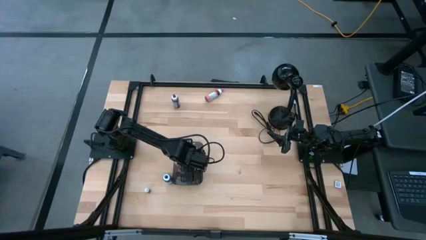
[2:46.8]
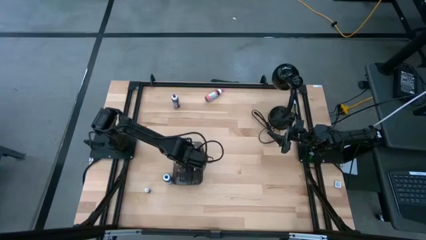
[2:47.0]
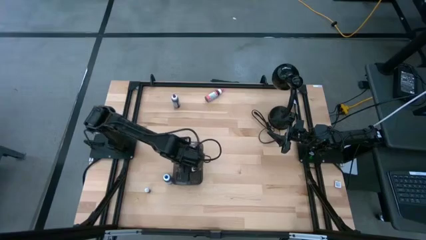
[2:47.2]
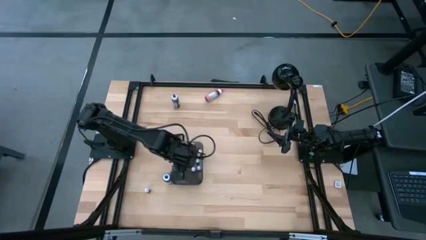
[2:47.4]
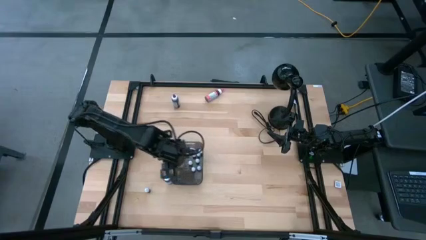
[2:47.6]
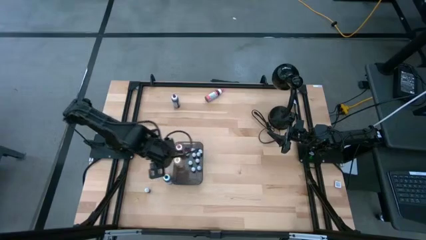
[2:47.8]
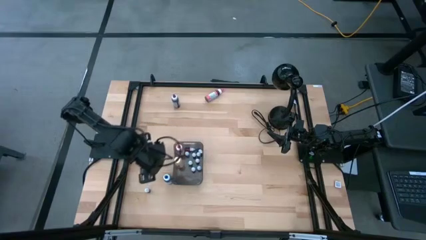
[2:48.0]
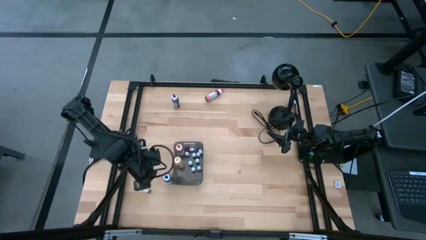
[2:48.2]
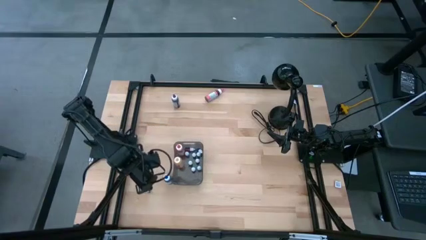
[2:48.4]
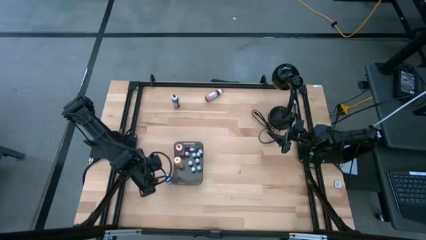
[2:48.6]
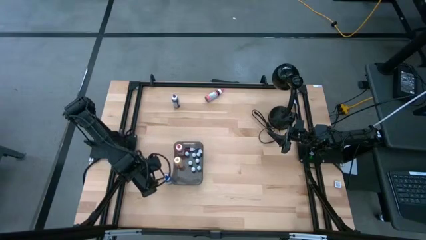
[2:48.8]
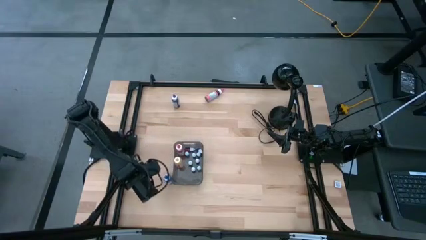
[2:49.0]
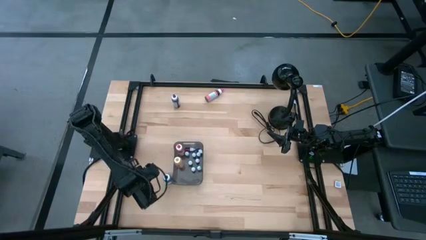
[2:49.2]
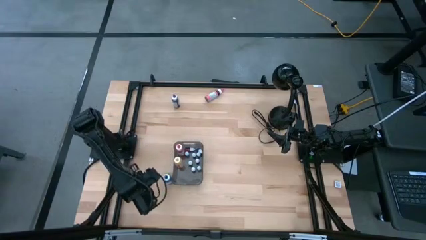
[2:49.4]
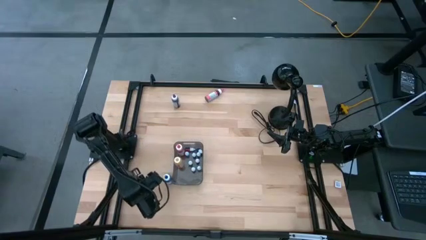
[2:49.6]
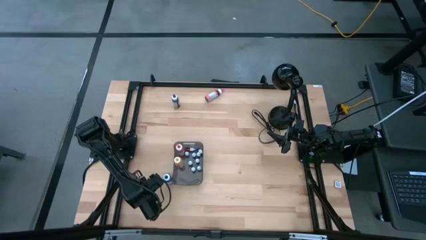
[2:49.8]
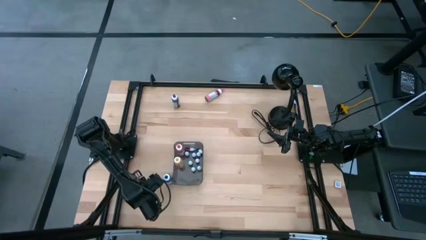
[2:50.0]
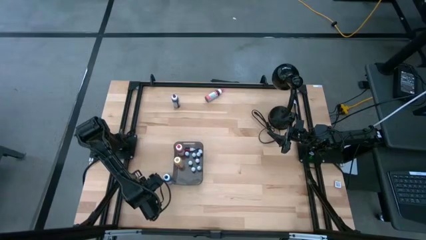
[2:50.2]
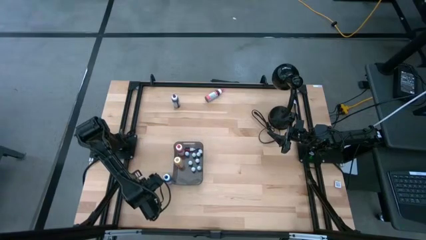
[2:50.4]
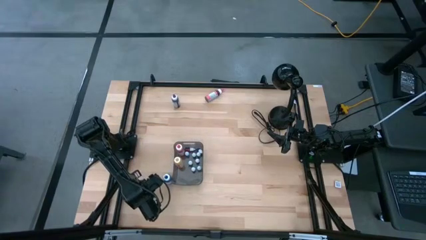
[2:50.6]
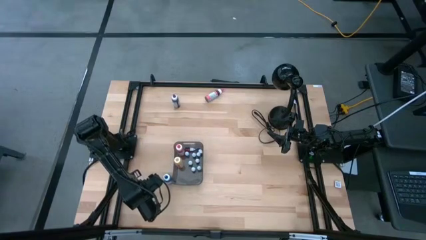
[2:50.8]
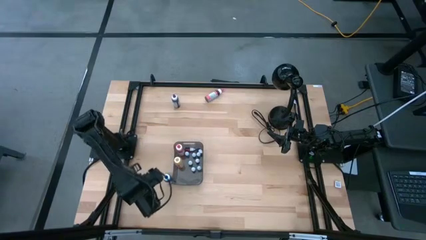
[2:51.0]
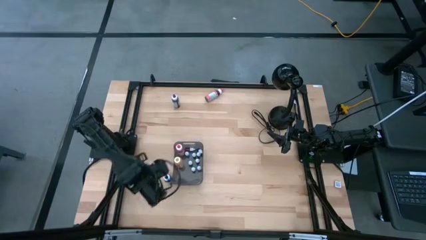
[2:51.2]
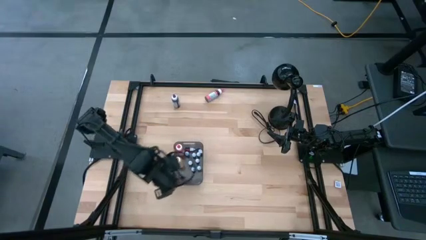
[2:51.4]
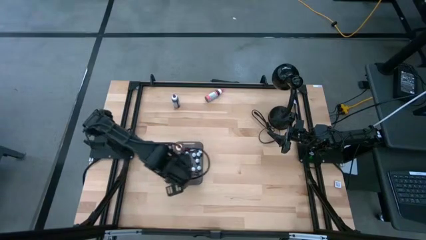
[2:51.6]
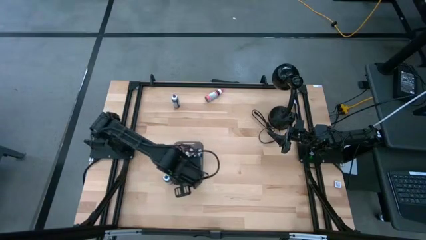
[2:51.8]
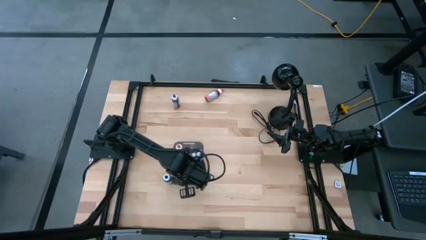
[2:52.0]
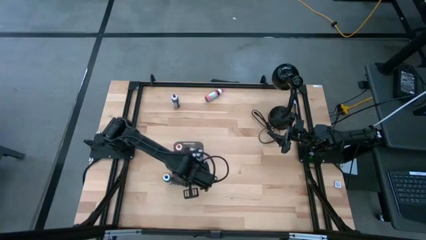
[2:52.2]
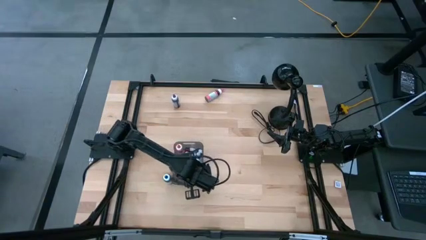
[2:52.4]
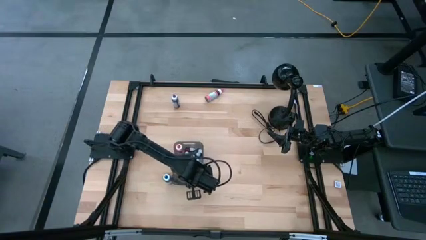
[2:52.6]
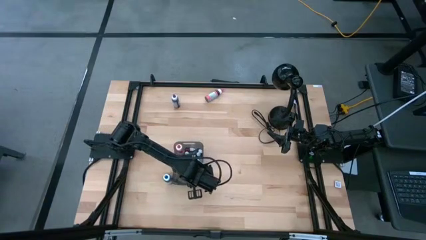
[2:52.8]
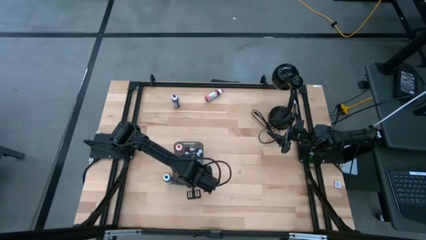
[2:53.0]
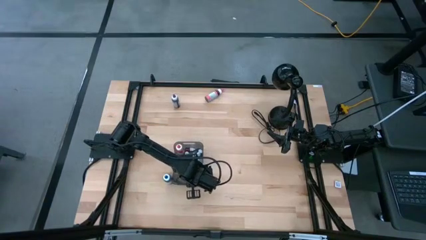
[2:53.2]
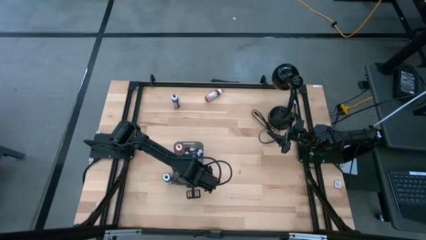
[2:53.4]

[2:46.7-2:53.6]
Task: Pick & Place food coloring
Put the light green food coloring bottle into the bin

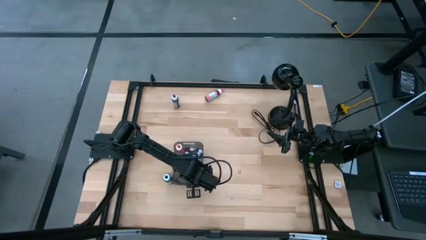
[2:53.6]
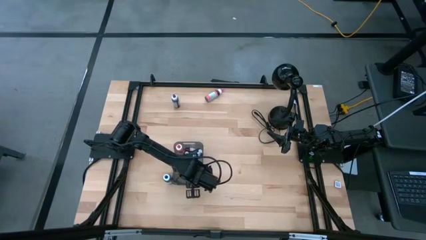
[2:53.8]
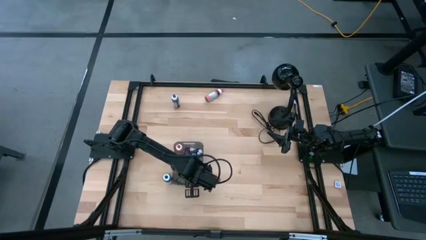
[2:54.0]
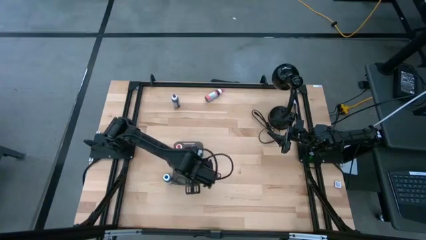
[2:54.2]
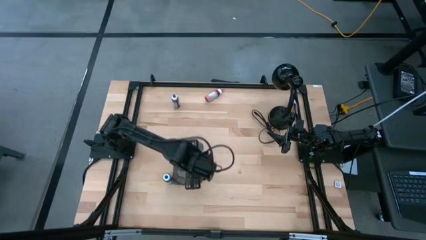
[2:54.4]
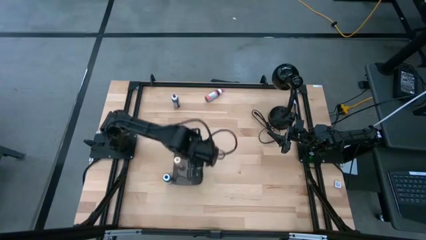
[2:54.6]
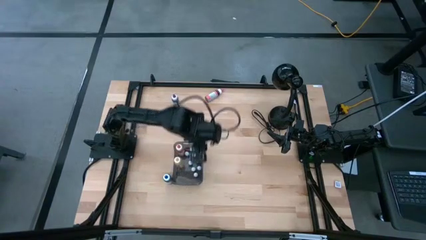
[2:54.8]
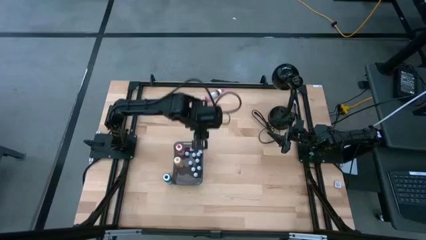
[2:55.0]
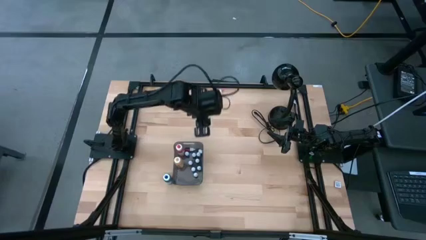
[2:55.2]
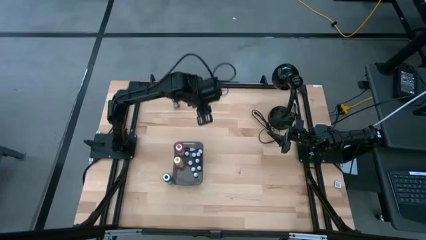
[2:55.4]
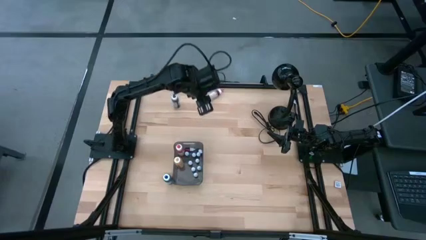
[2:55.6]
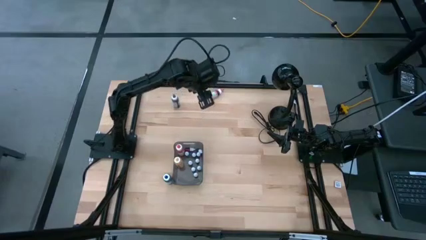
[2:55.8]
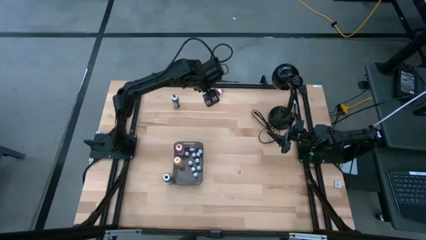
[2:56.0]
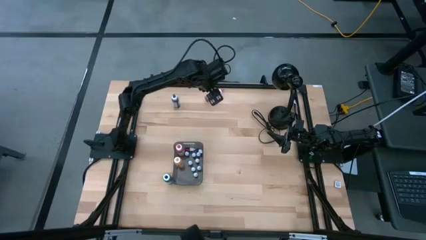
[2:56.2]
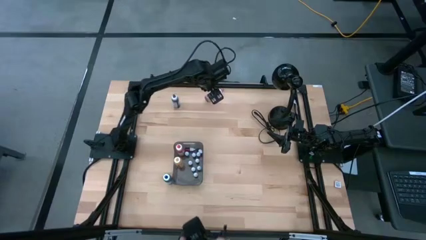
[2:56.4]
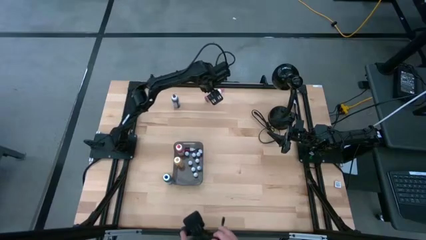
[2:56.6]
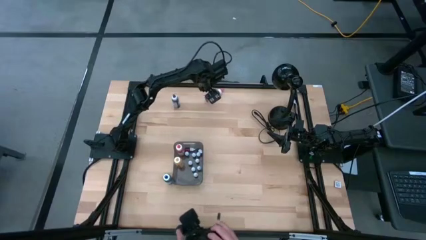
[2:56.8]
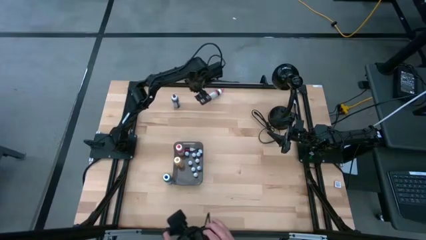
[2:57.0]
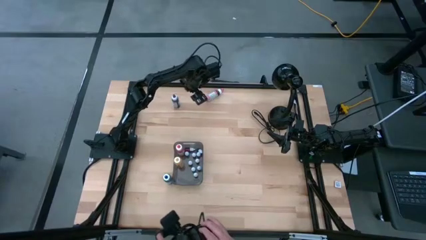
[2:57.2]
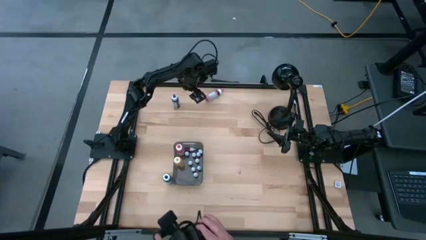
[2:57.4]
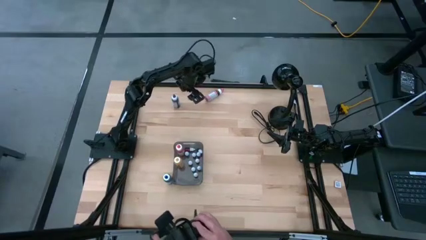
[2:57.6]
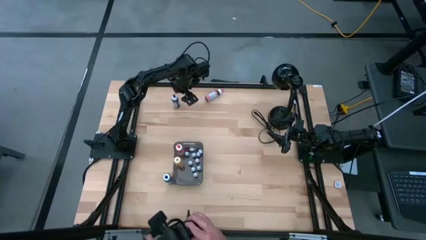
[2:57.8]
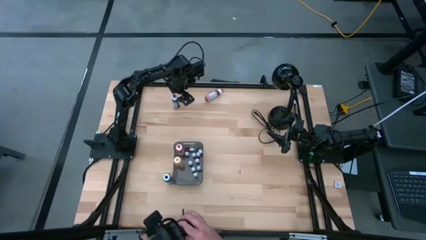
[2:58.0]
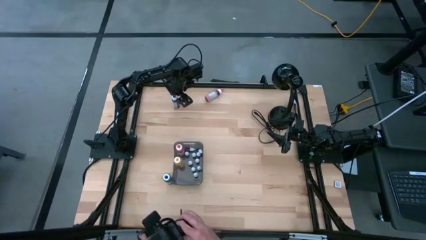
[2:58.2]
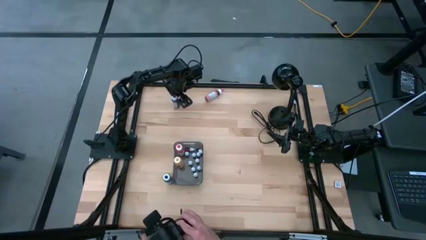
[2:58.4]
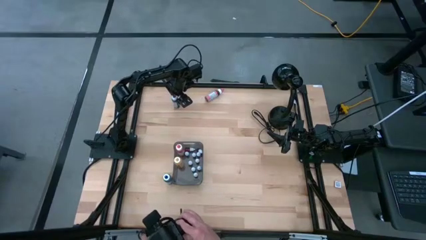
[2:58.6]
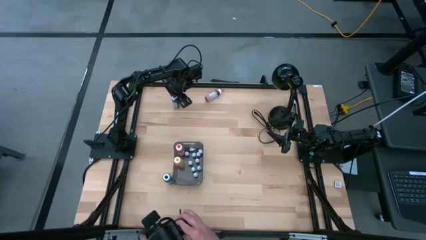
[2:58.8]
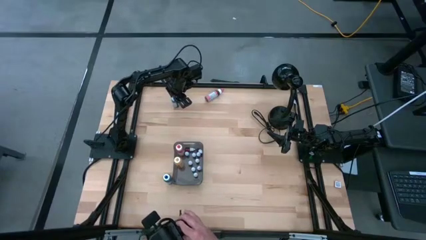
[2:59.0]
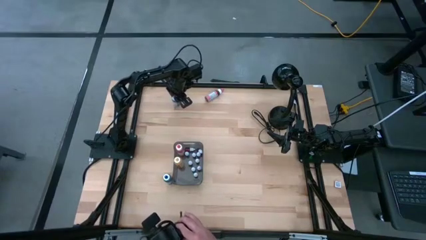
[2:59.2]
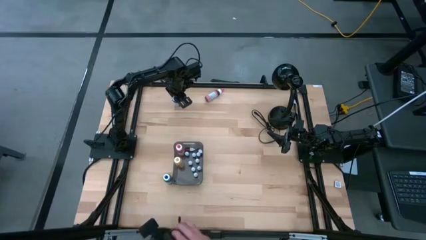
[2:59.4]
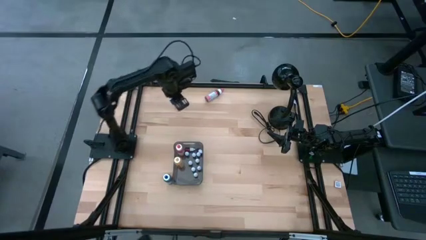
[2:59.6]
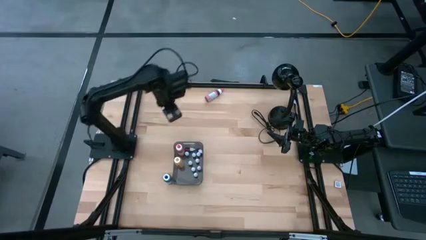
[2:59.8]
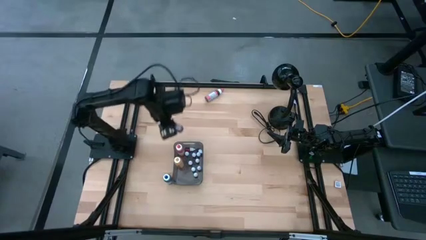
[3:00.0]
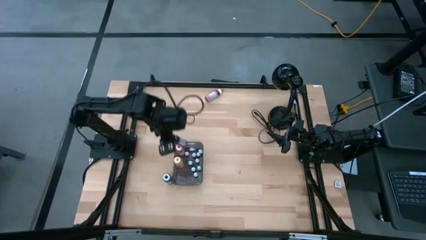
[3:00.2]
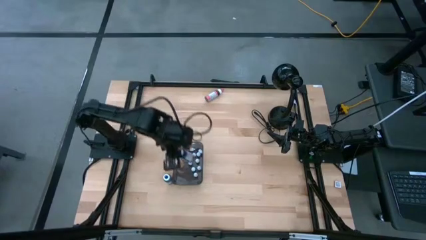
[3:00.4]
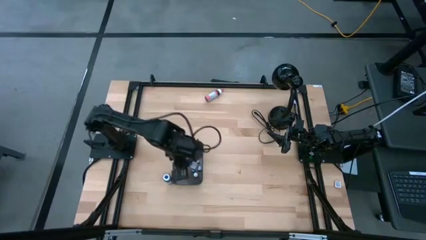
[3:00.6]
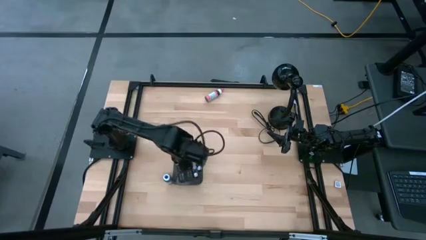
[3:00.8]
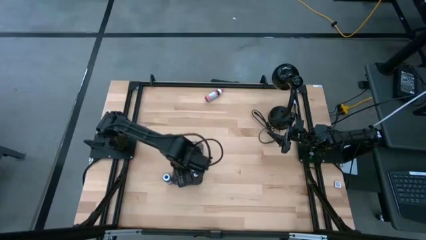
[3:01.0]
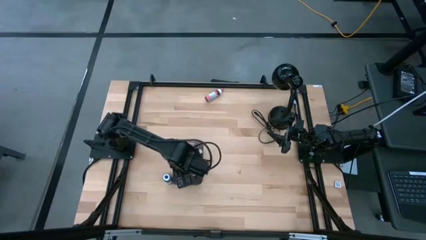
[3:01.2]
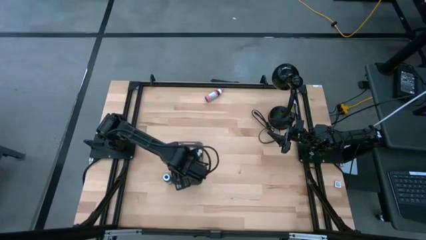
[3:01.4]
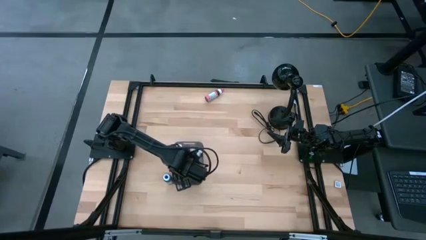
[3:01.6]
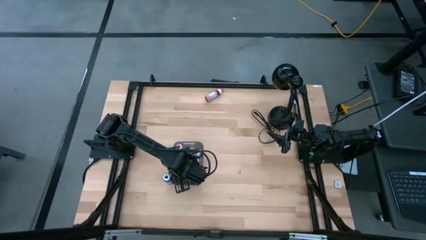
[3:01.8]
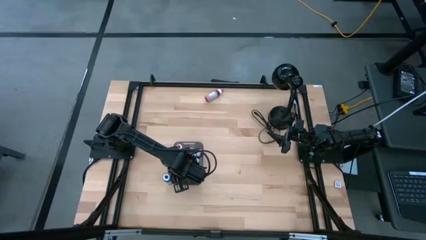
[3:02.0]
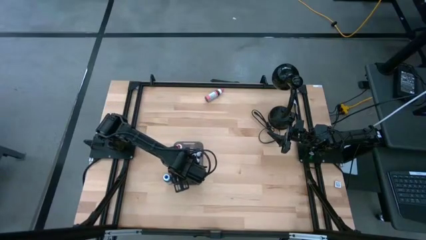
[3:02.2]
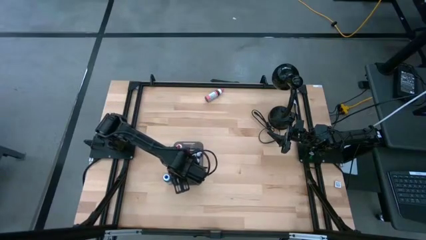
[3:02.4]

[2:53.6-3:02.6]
Put the purple food coloring bottle into the bin
